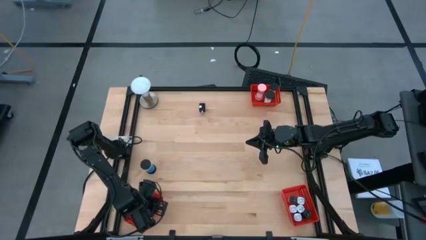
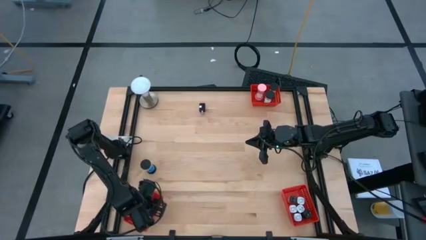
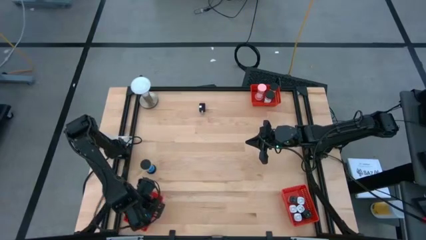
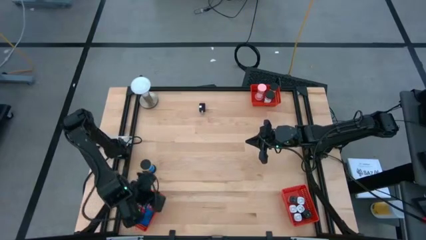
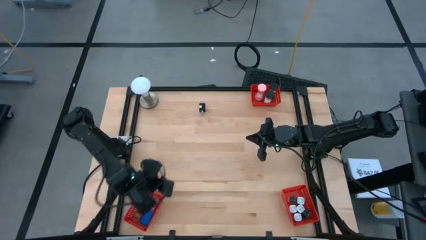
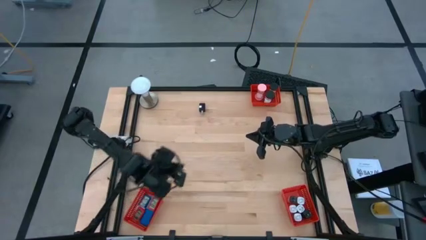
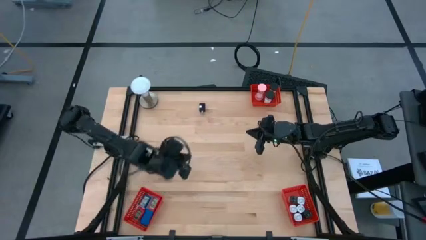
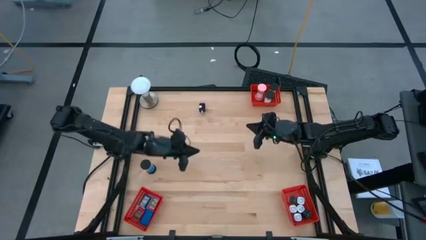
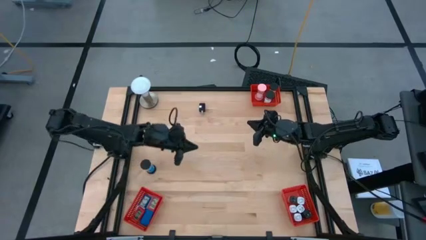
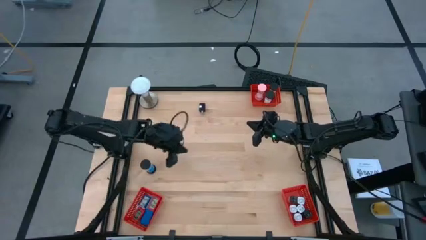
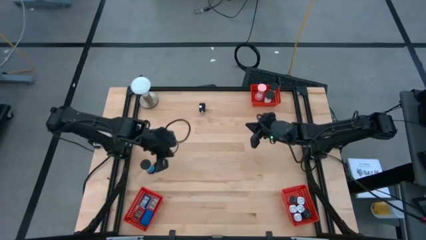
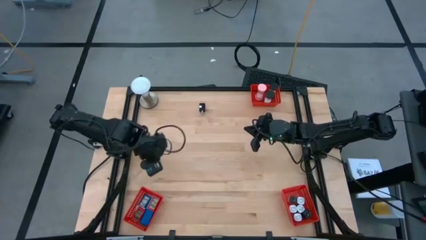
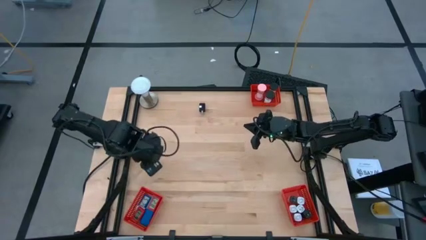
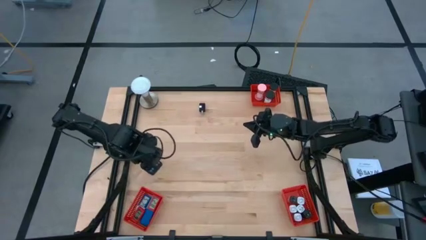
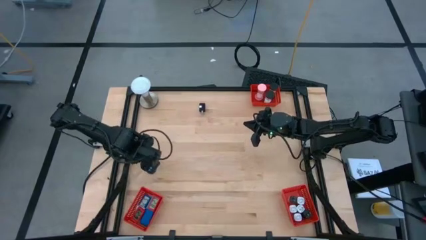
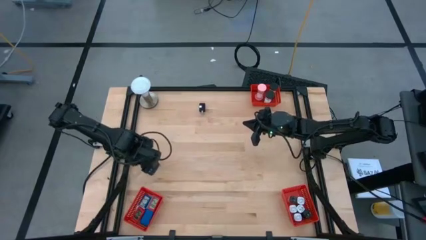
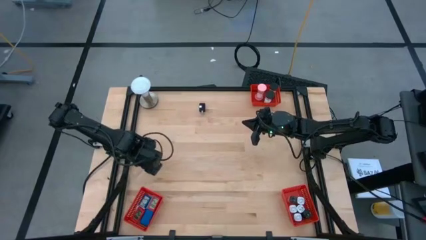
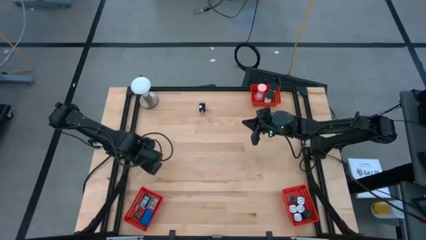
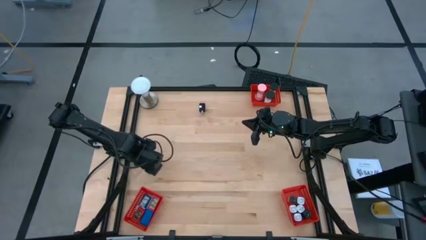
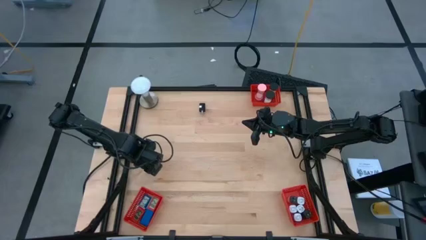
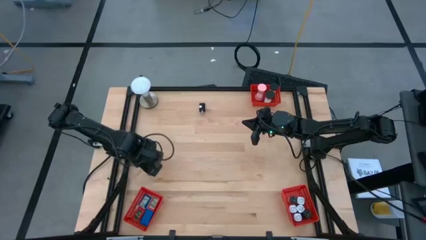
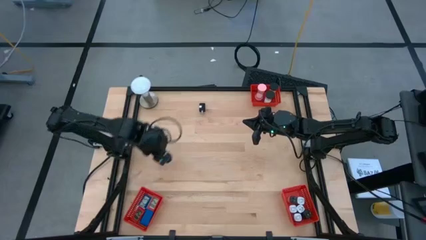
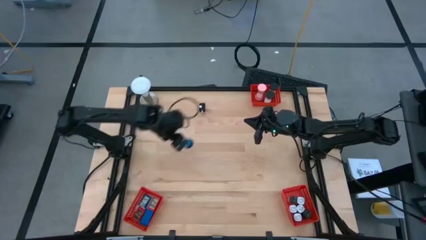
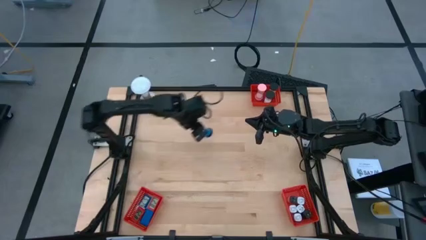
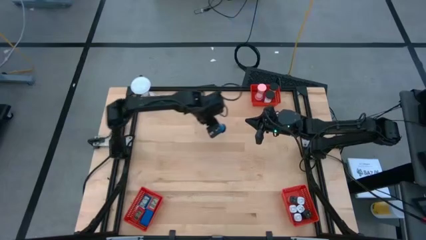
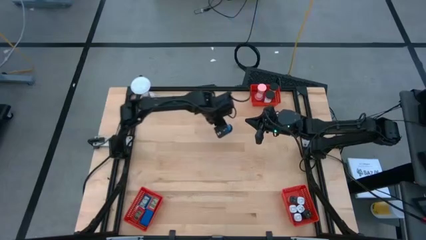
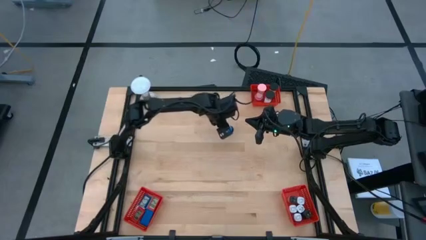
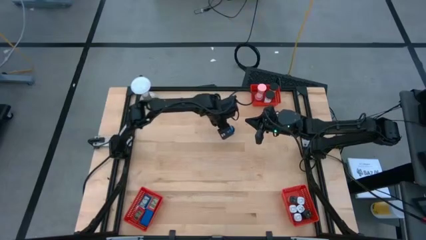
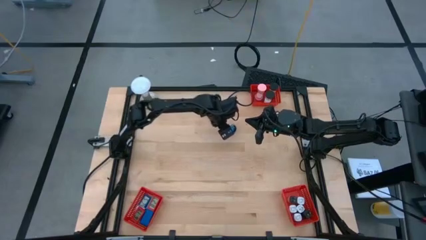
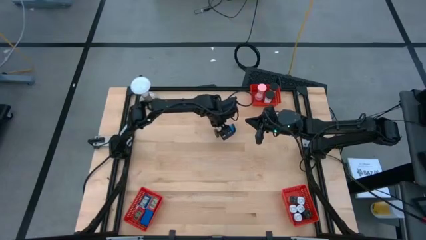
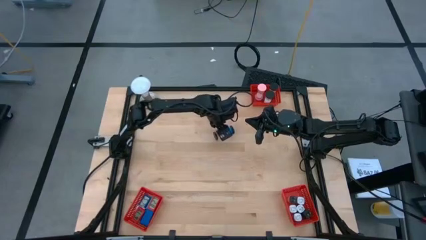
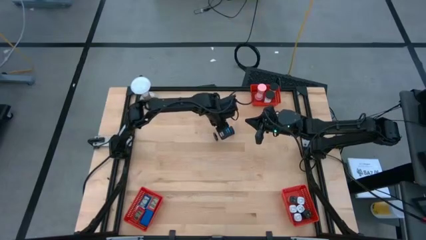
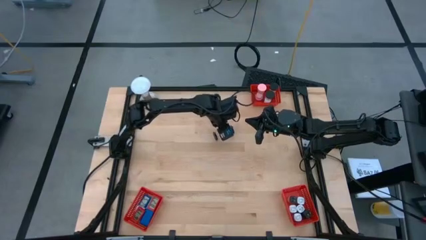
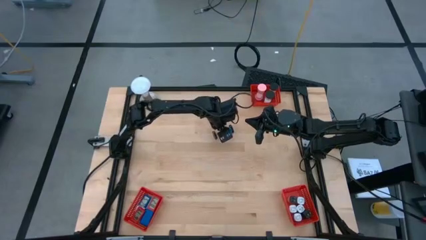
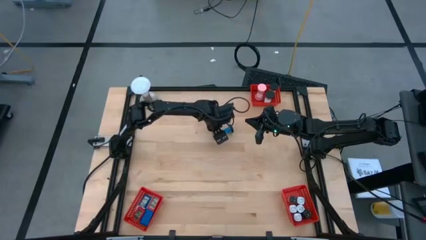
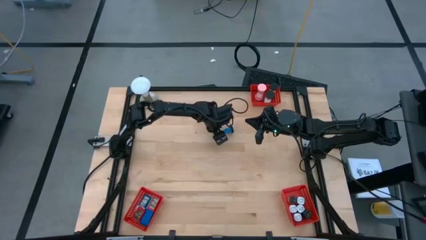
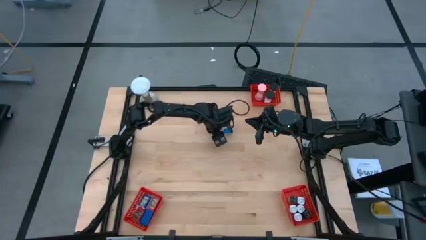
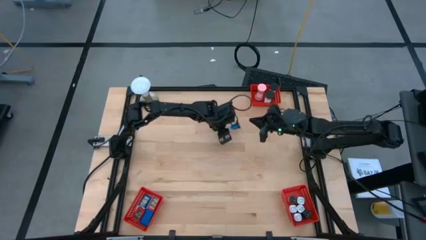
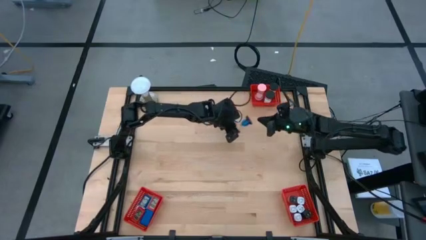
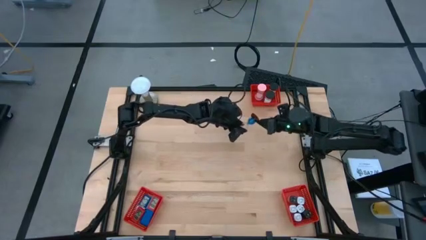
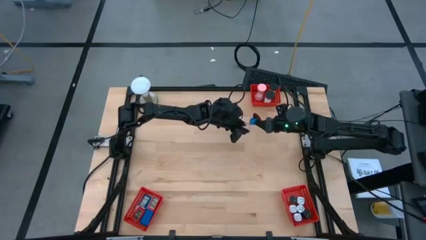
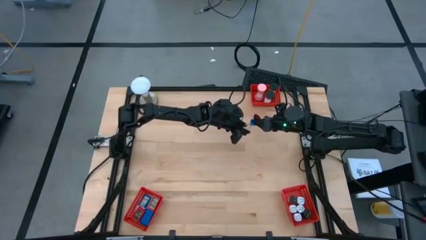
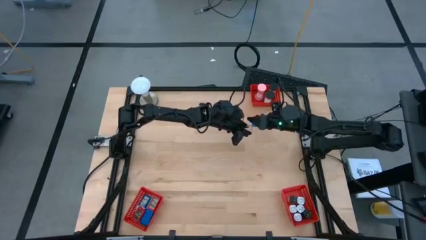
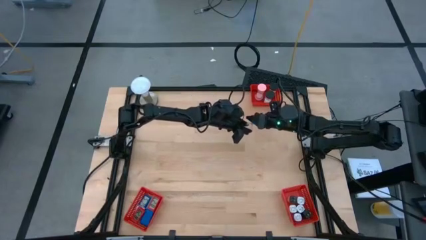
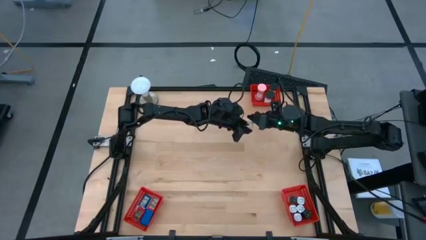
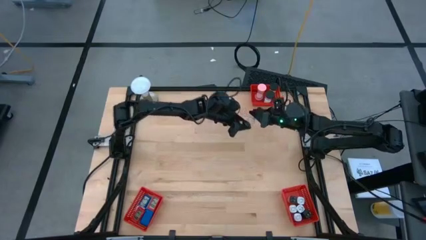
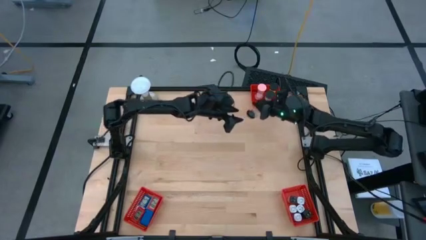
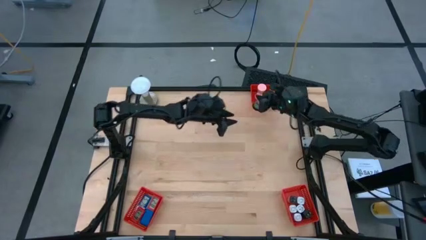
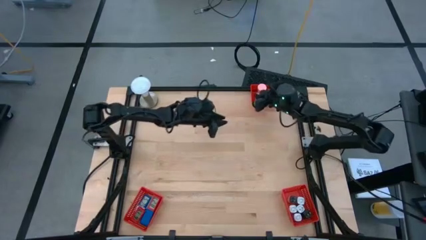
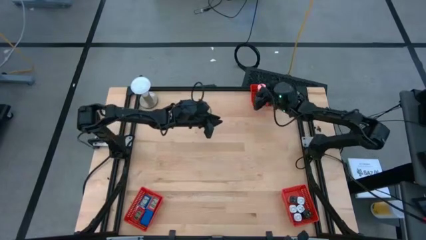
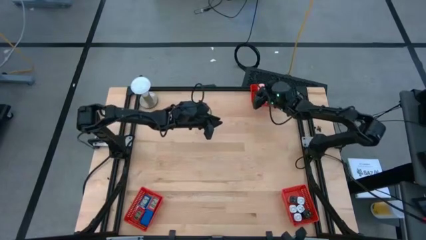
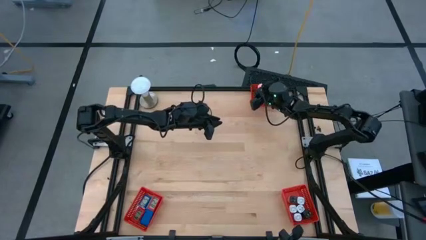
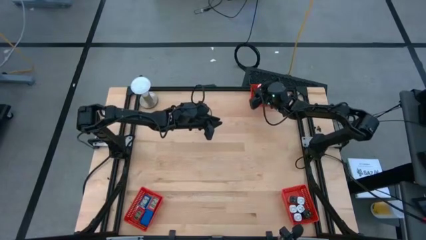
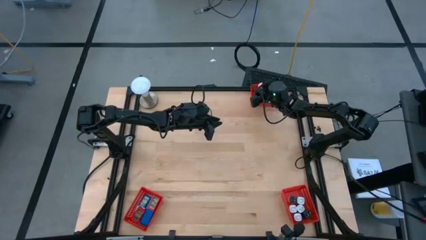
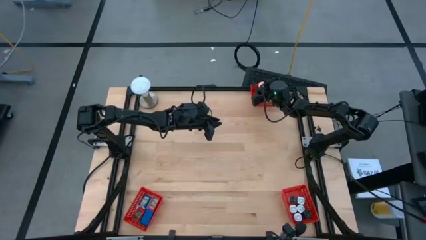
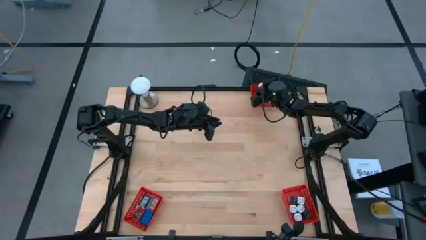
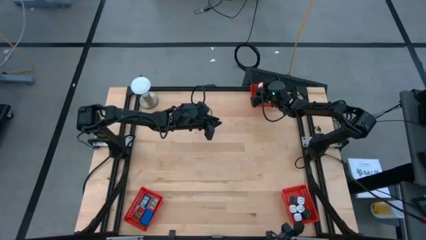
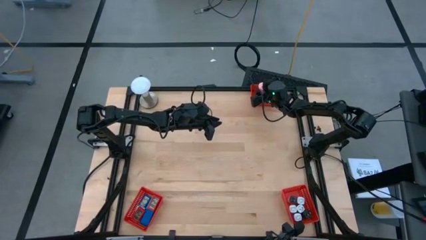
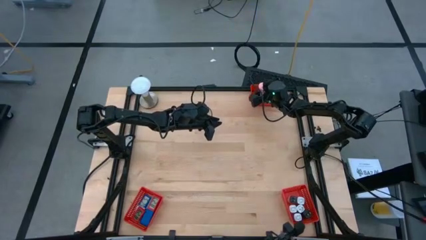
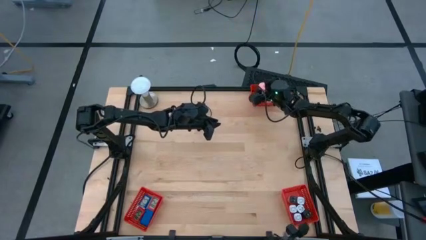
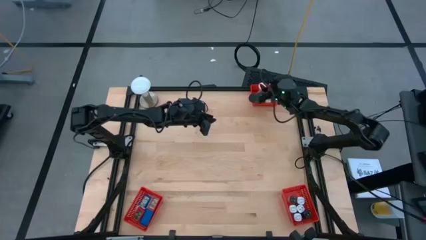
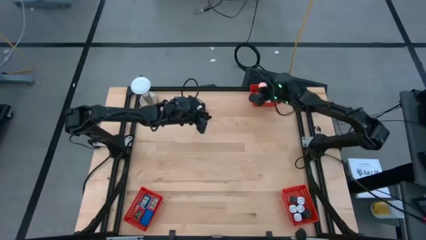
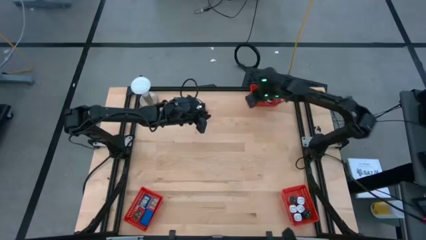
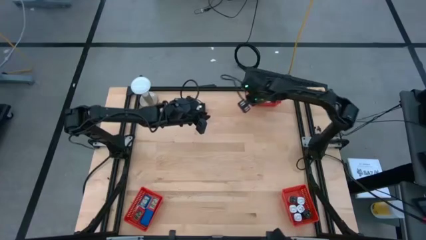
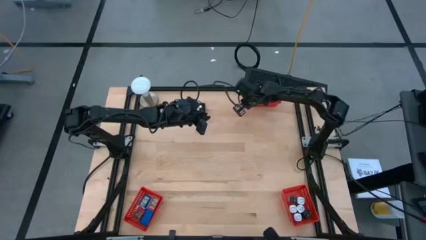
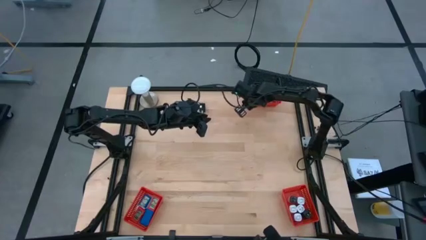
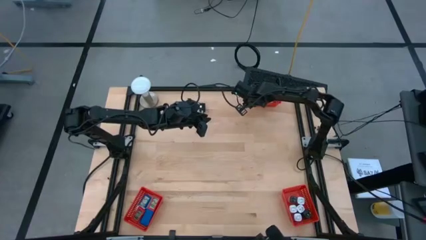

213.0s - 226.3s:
Task: Pick & Place Office items
Put the blue hourglass into the top red basket

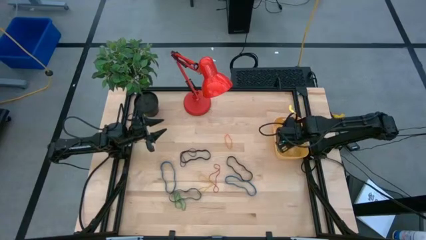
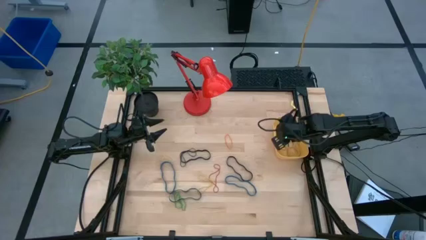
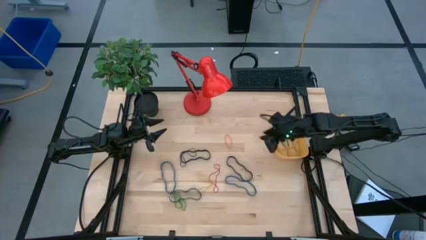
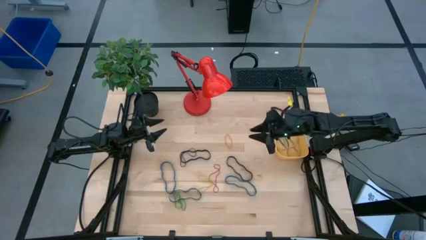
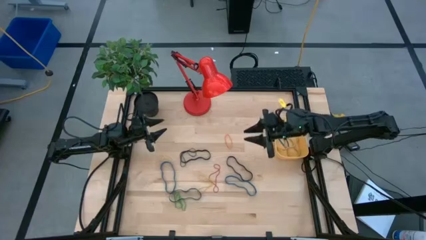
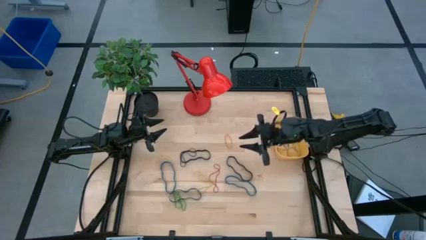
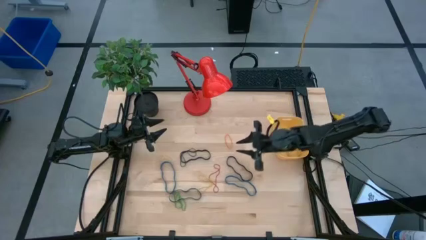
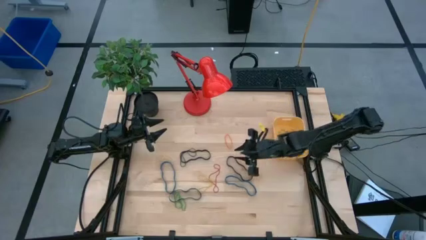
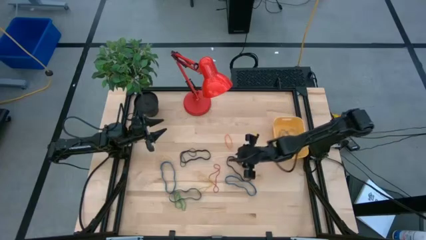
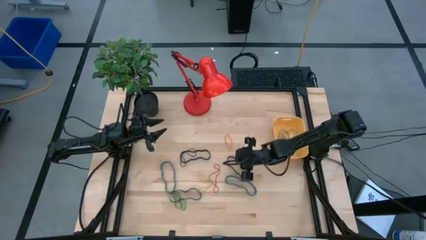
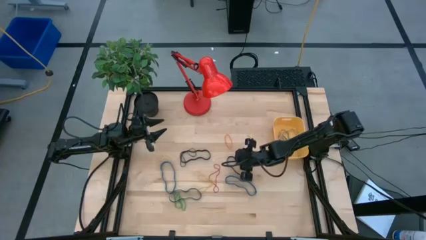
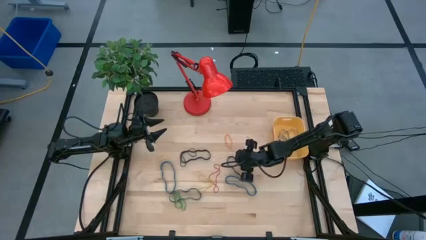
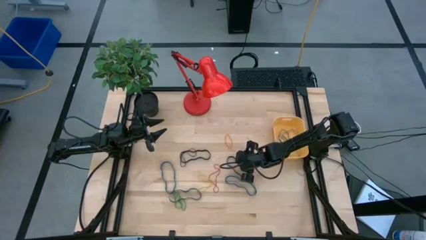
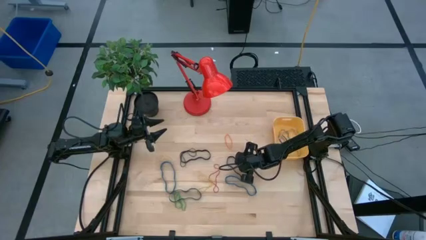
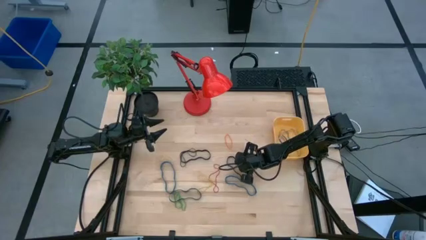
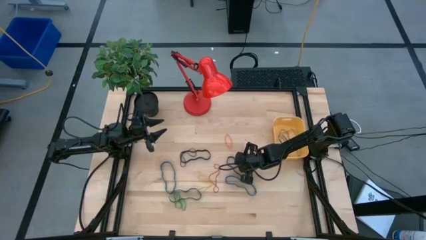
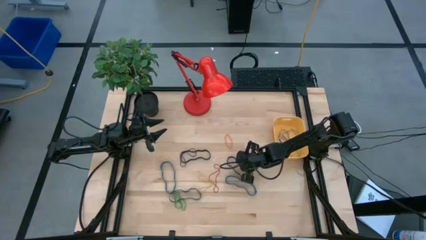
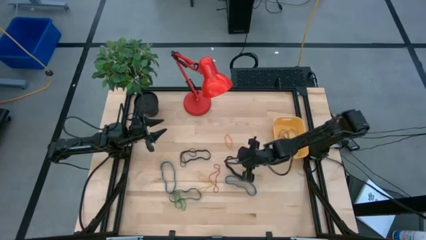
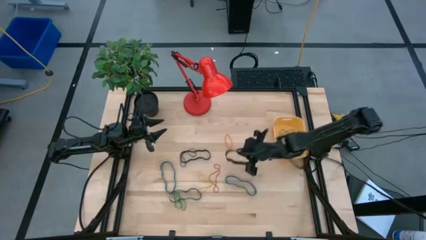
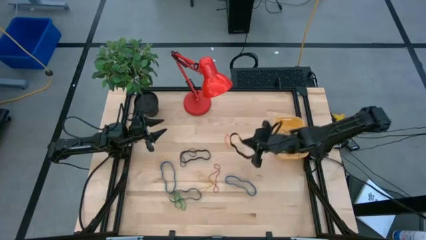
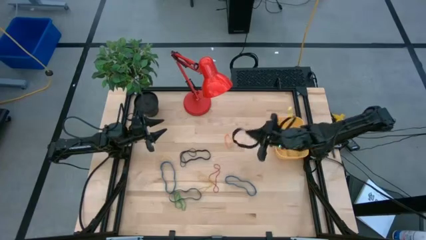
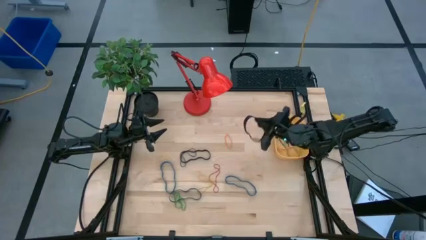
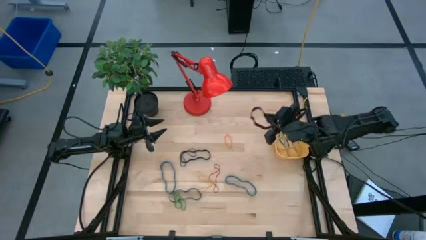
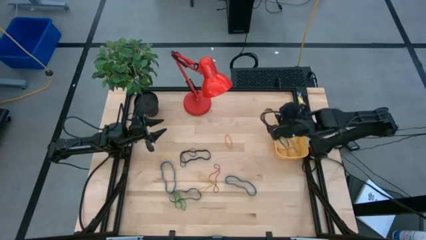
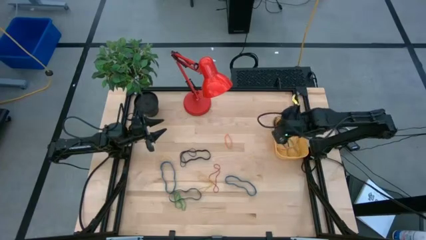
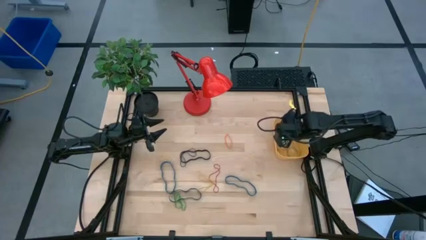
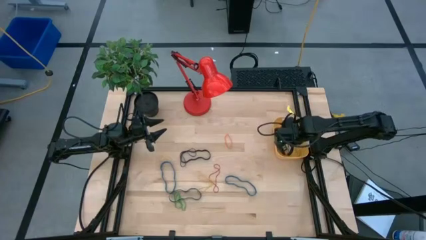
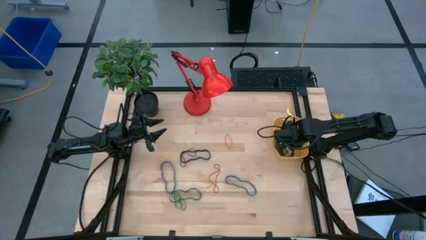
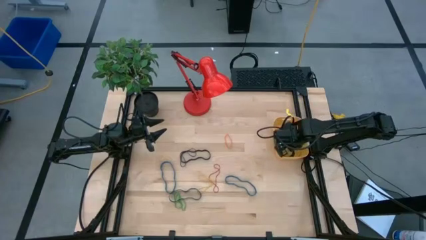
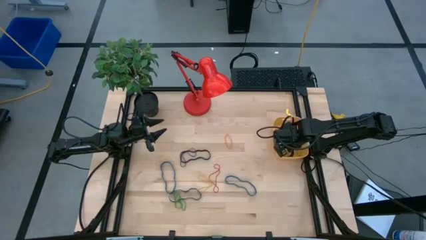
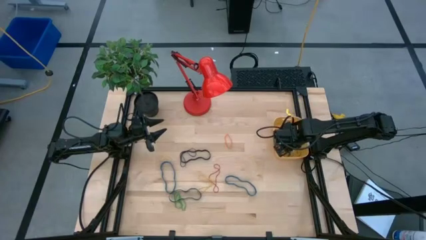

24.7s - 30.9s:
Task: Pick and place rubber bands into bin
Put the top right black rubber band into the yellow bin
